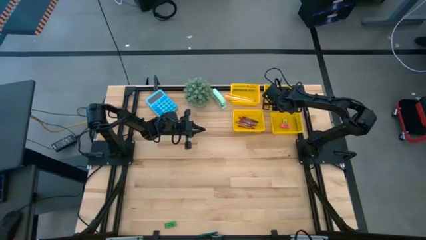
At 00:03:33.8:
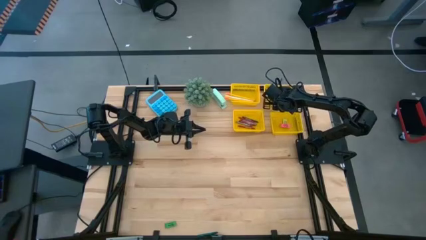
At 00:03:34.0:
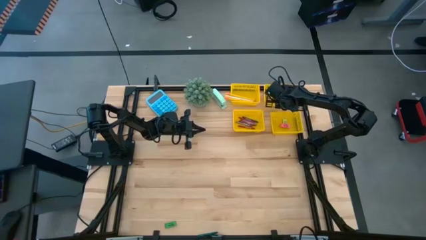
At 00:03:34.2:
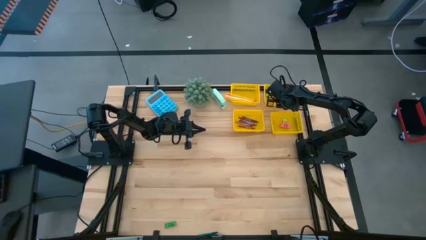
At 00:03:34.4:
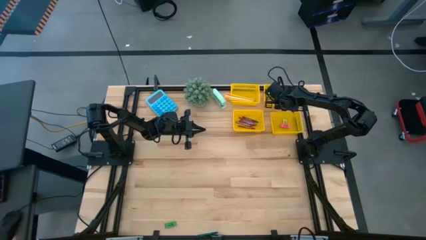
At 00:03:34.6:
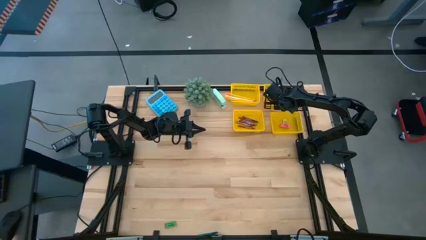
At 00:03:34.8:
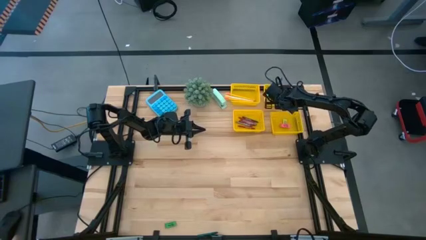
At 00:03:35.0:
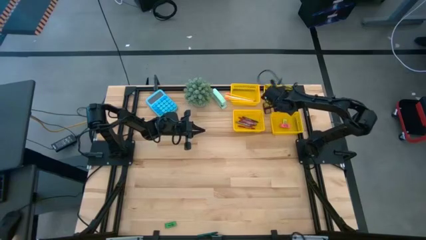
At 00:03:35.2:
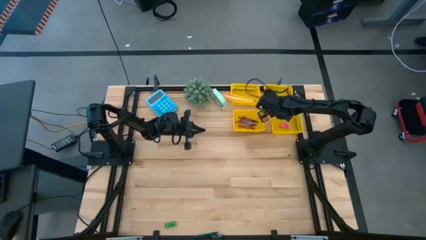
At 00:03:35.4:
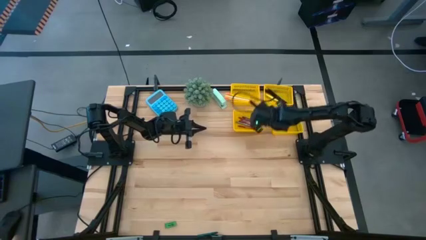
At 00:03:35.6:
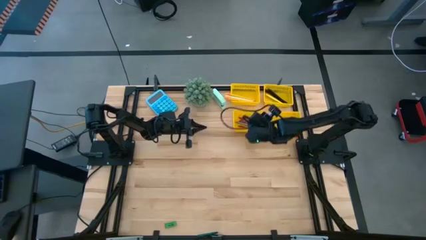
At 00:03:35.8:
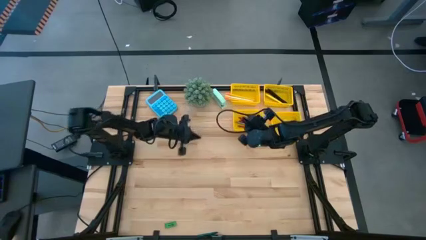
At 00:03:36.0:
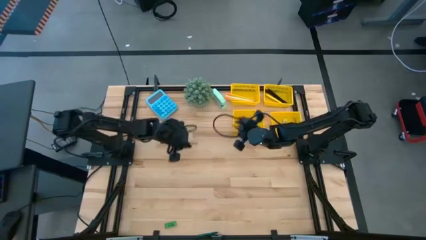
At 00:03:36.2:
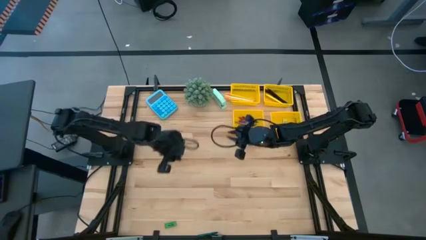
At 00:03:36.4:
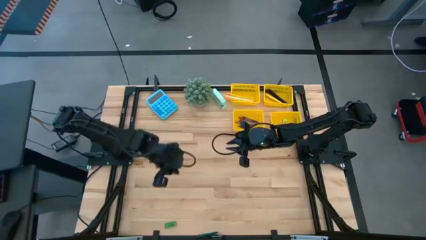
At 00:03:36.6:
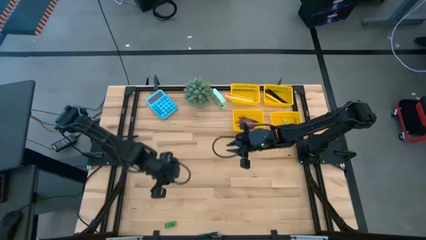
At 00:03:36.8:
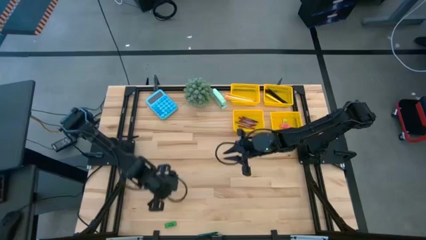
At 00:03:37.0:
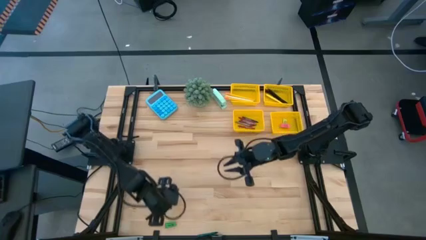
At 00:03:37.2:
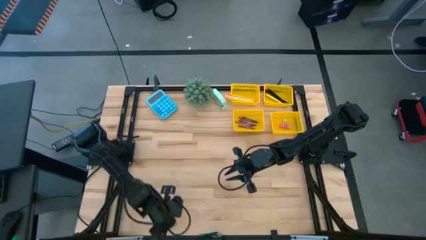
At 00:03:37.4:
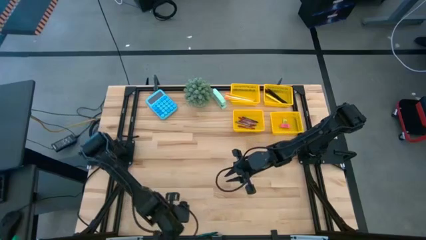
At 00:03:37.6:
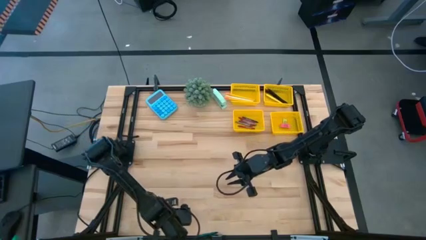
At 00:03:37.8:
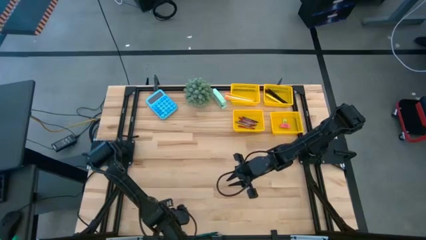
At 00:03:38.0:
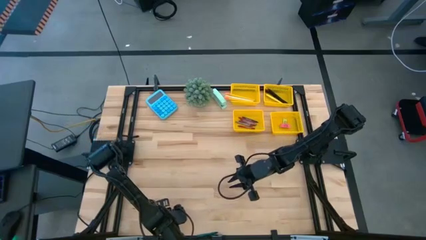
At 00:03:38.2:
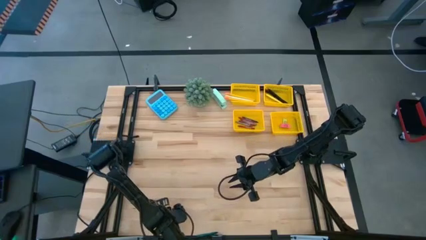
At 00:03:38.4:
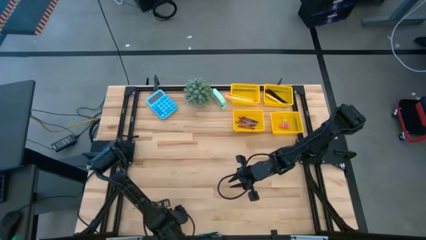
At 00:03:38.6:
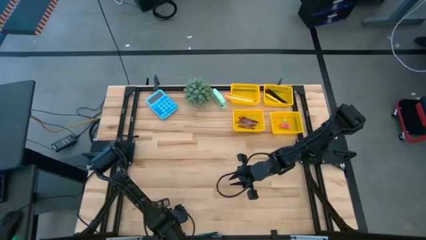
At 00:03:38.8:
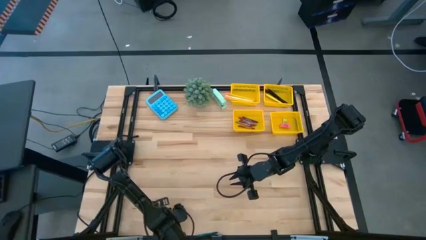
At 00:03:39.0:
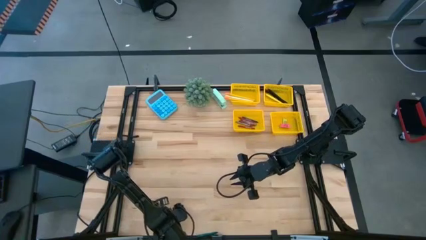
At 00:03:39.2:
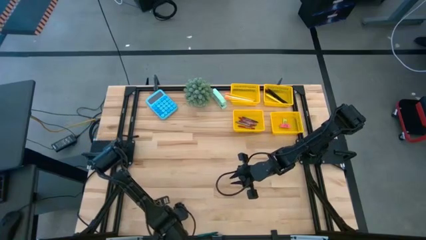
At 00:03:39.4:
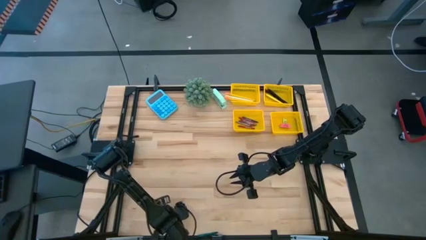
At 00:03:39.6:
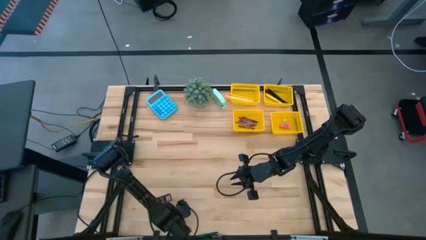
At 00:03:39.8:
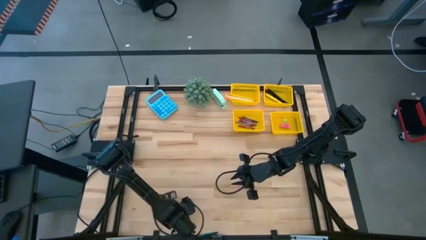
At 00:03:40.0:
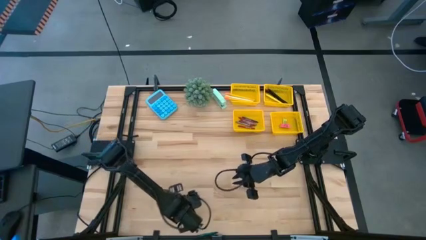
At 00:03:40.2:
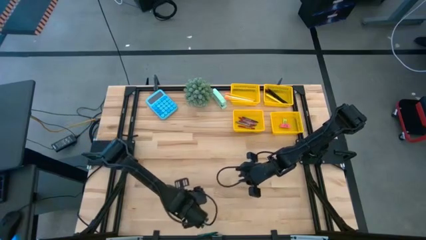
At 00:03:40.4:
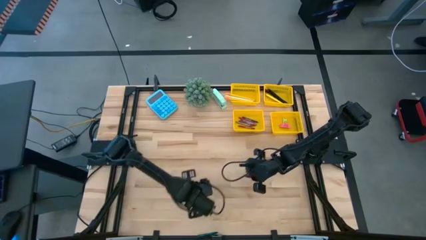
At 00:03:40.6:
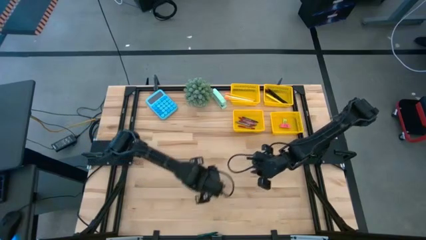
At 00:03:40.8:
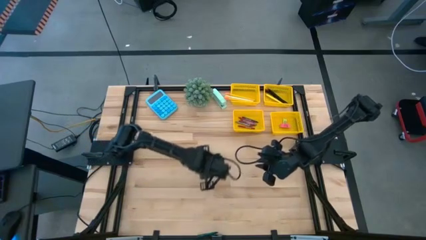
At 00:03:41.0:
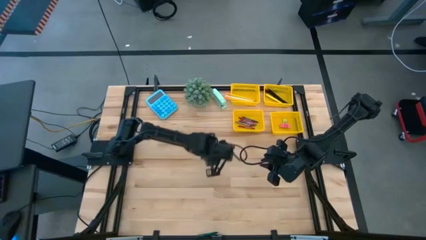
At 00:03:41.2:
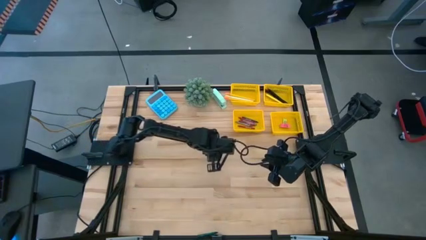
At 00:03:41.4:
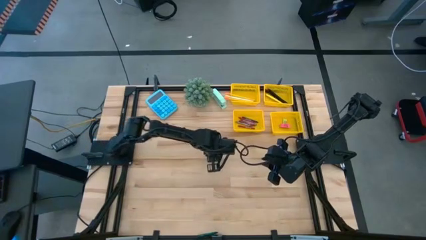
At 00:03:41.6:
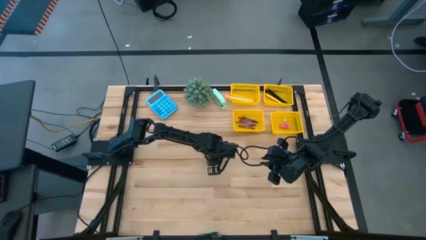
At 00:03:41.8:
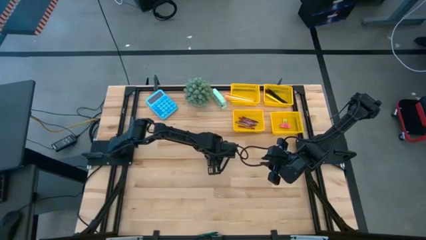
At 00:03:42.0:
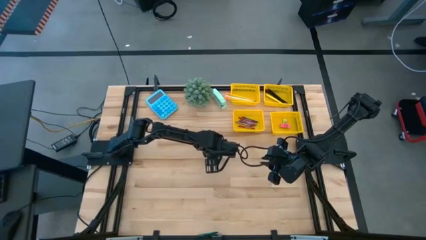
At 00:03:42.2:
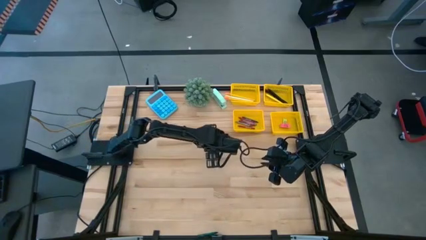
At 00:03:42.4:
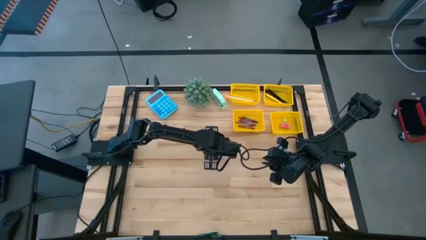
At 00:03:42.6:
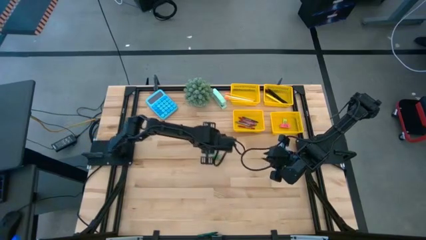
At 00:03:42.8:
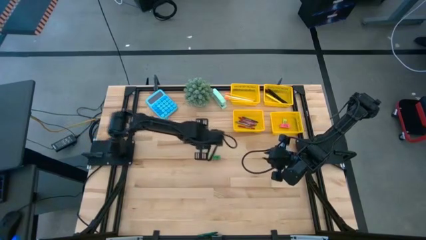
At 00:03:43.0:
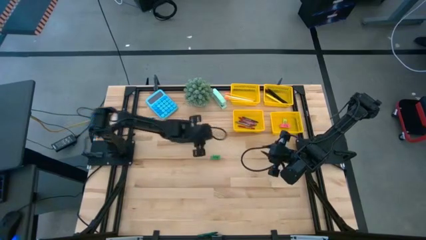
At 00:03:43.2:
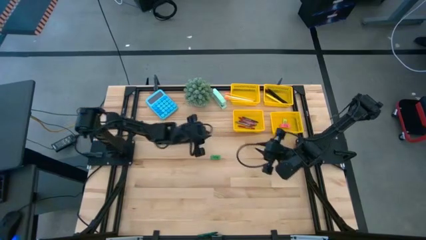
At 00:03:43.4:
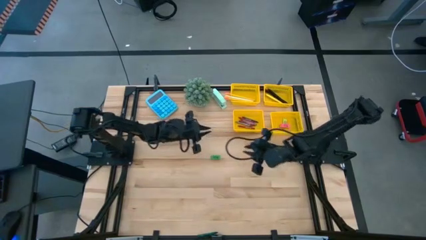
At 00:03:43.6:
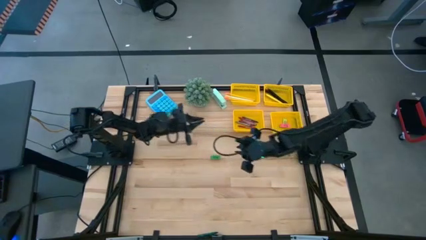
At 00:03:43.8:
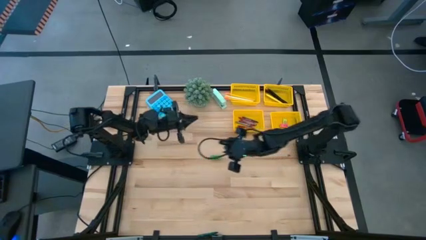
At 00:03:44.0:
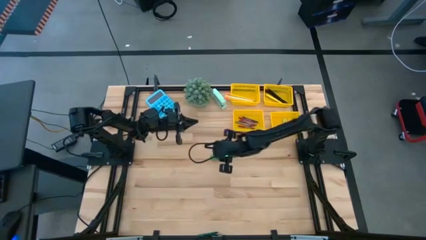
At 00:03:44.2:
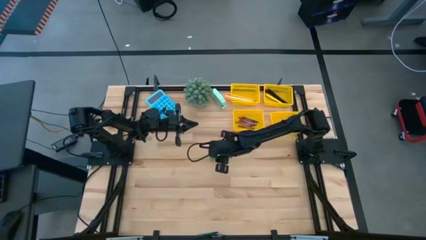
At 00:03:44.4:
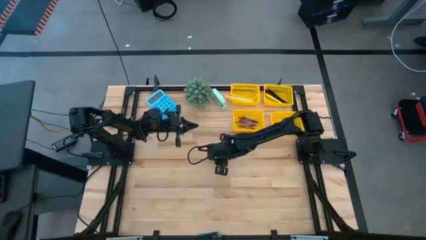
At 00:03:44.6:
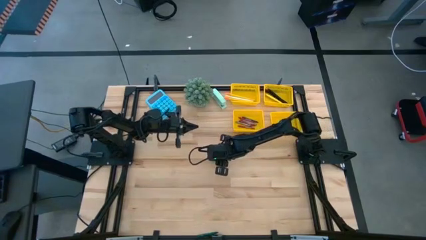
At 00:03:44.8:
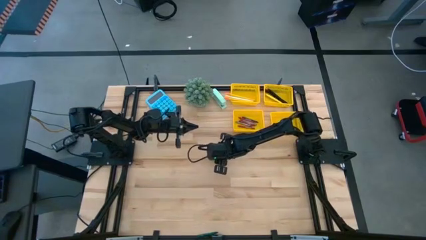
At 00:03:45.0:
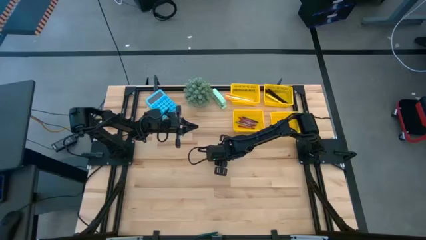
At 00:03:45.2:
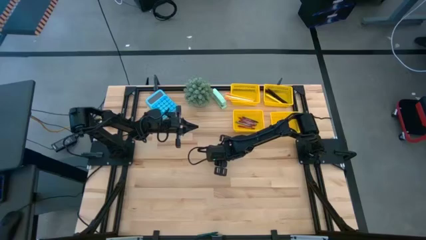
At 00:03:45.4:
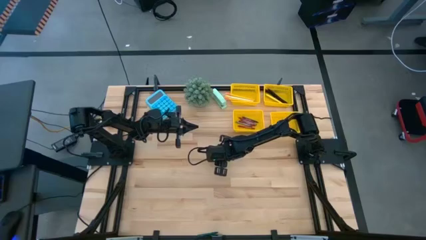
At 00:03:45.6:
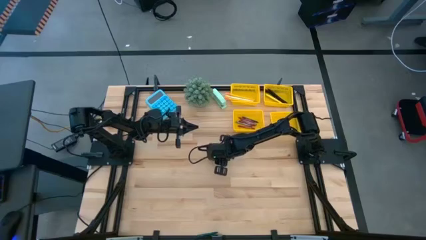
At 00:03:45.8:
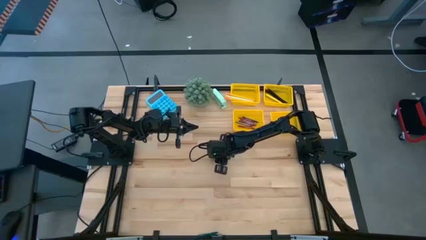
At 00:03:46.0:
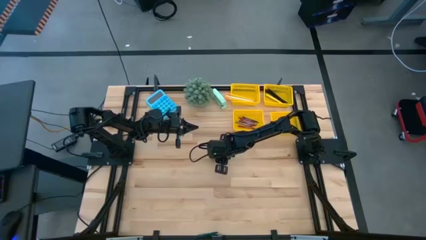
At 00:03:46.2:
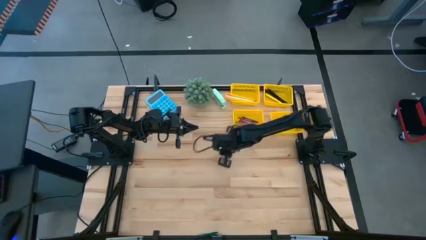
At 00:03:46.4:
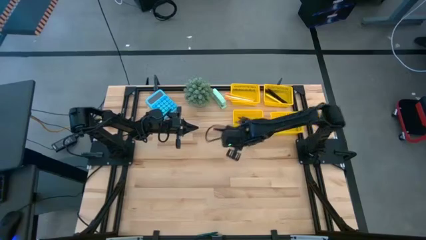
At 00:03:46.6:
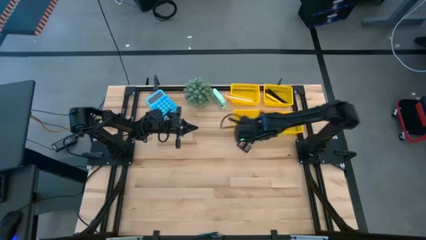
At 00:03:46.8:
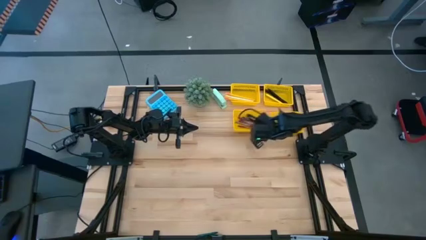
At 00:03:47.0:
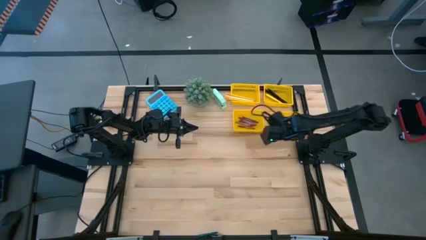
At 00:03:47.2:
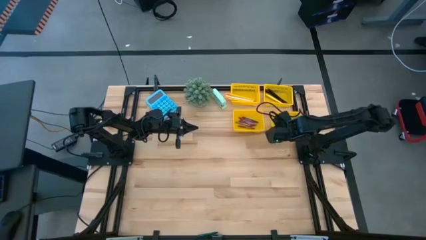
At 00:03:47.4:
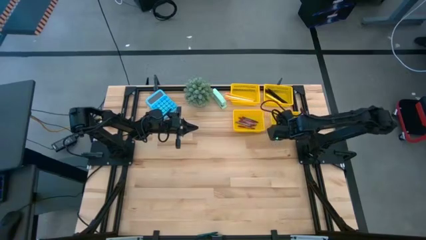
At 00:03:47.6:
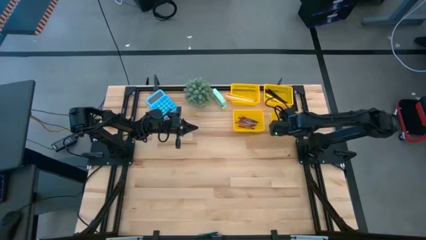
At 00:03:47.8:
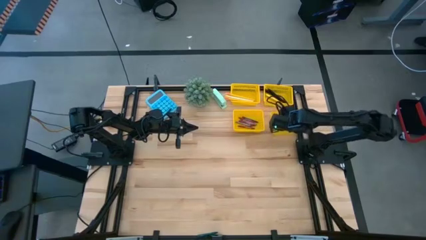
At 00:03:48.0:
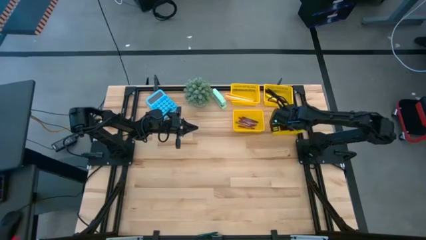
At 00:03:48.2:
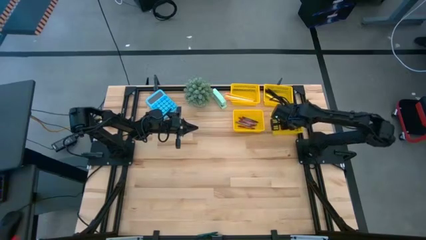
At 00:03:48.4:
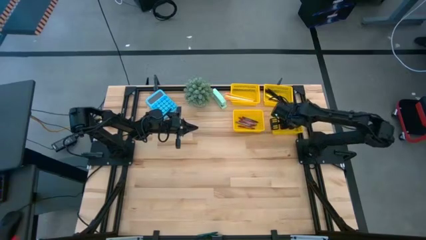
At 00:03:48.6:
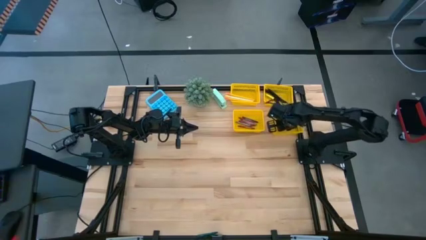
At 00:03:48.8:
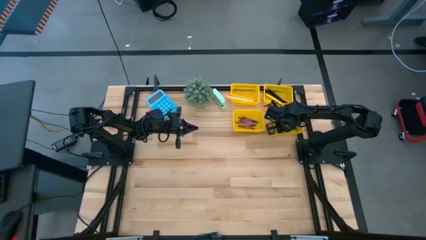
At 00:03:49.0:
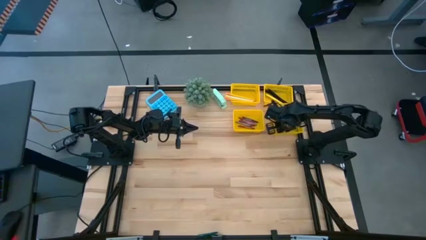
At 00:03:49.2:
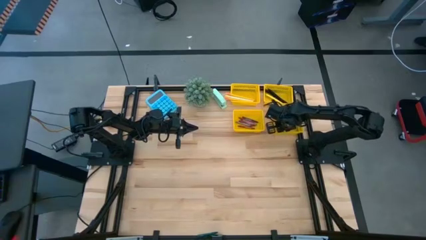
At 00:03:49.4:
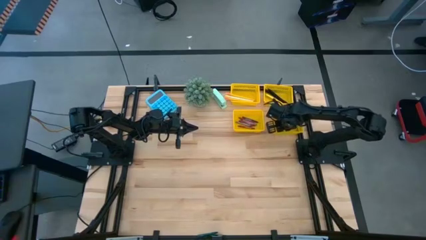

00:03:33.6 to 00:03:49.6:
Task: Sort crayons/erasers/pens/pencils in bins
Put the green eraser into the bottom right yellow bin
